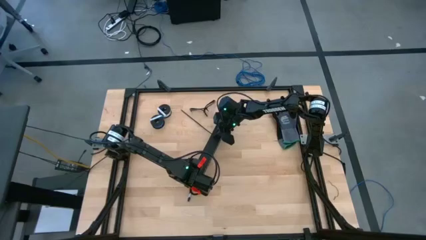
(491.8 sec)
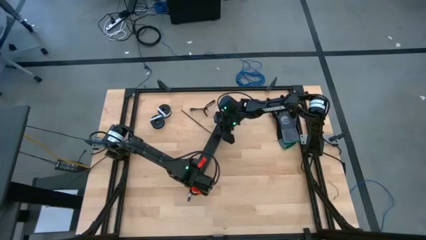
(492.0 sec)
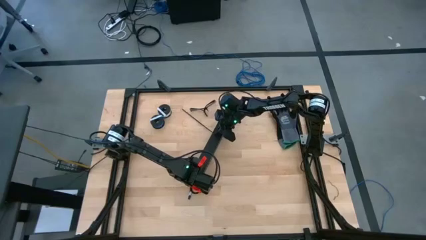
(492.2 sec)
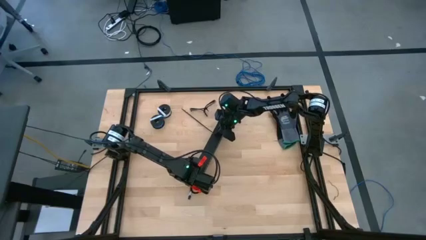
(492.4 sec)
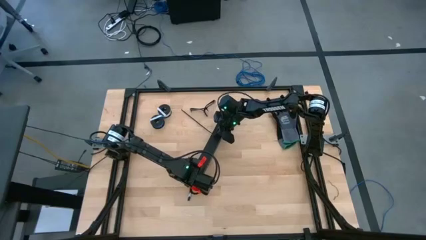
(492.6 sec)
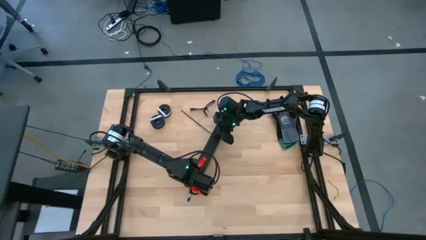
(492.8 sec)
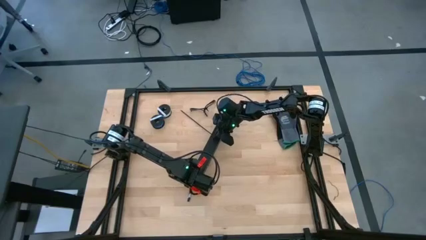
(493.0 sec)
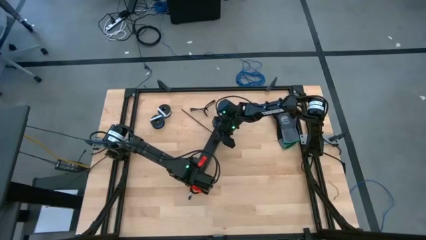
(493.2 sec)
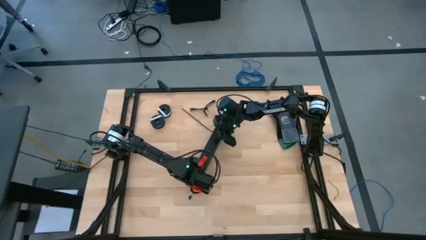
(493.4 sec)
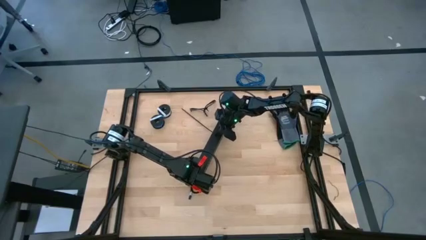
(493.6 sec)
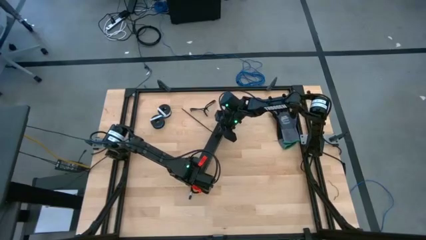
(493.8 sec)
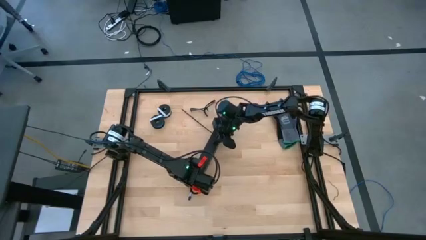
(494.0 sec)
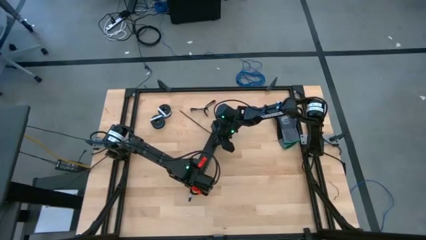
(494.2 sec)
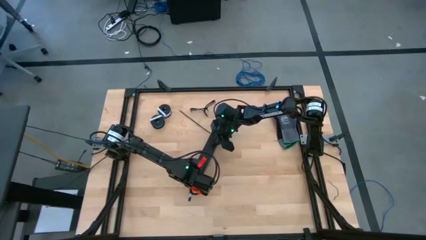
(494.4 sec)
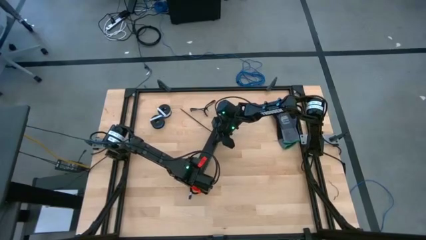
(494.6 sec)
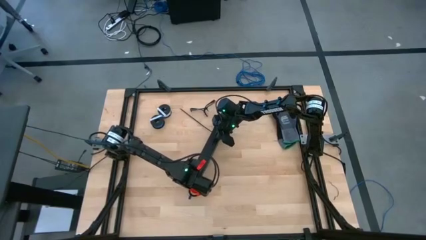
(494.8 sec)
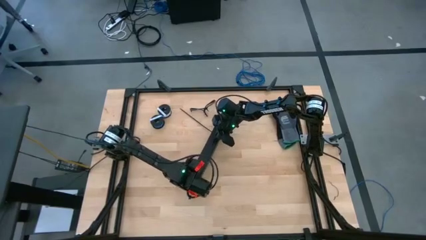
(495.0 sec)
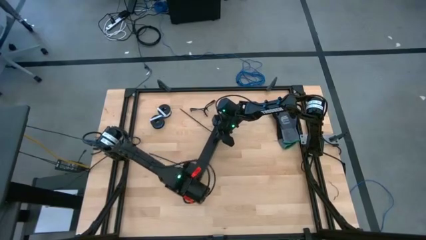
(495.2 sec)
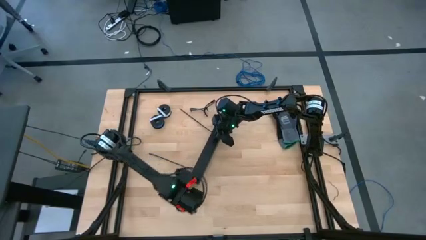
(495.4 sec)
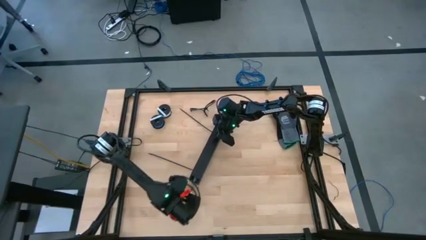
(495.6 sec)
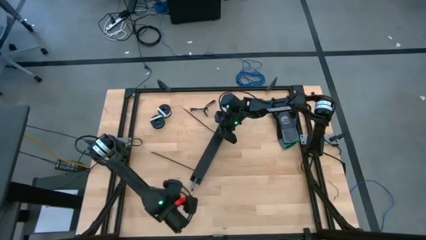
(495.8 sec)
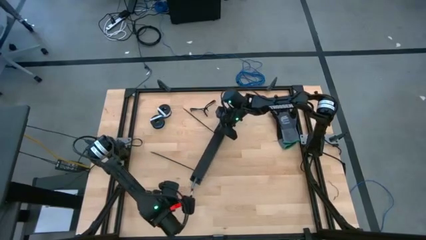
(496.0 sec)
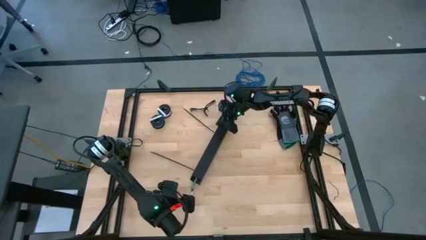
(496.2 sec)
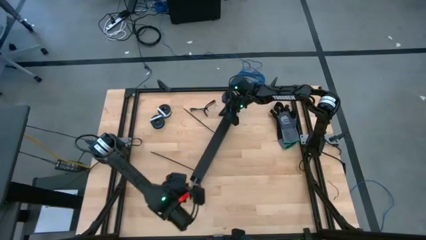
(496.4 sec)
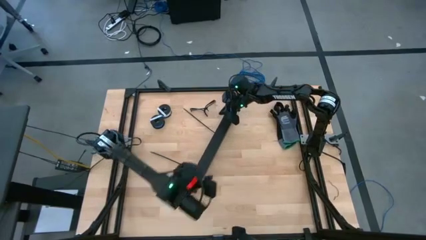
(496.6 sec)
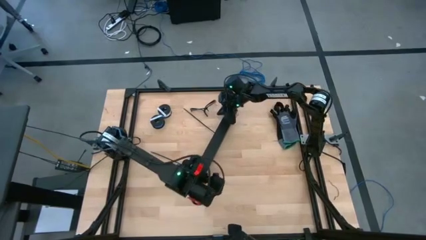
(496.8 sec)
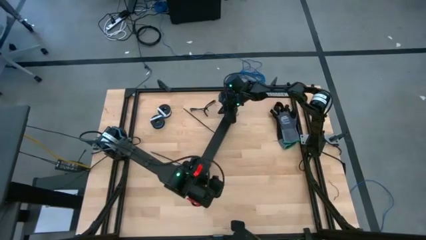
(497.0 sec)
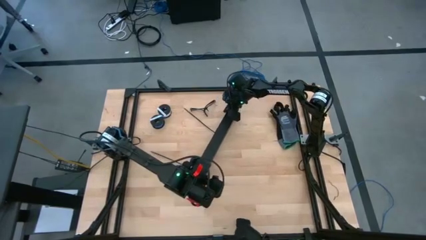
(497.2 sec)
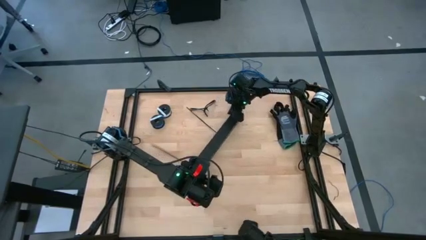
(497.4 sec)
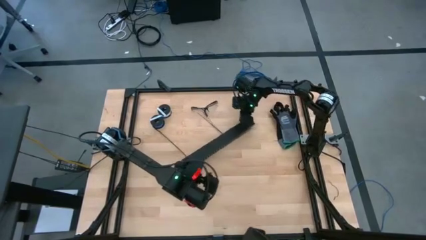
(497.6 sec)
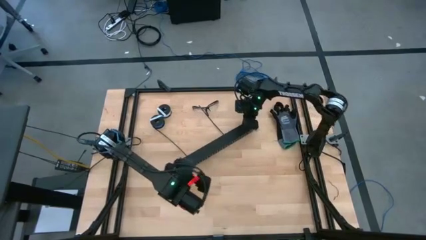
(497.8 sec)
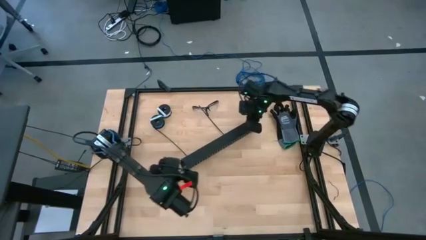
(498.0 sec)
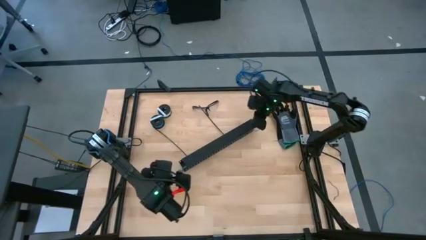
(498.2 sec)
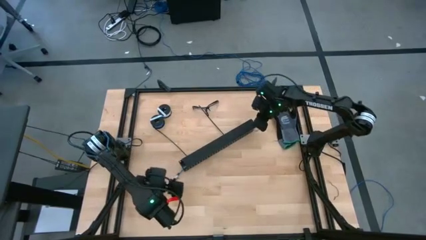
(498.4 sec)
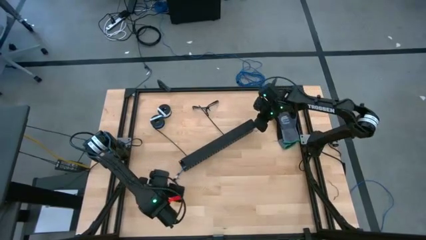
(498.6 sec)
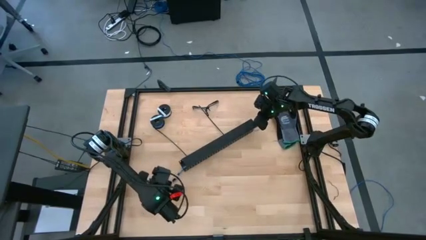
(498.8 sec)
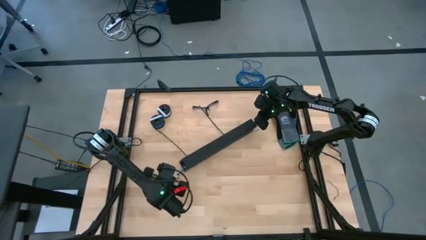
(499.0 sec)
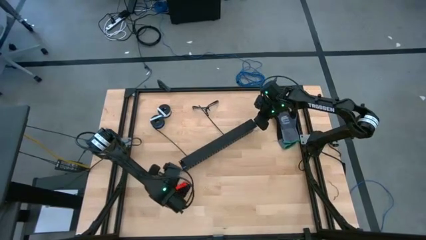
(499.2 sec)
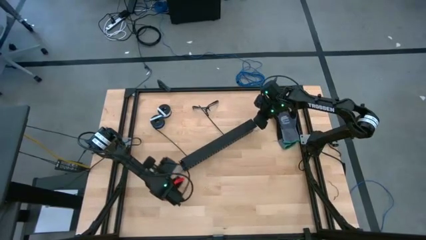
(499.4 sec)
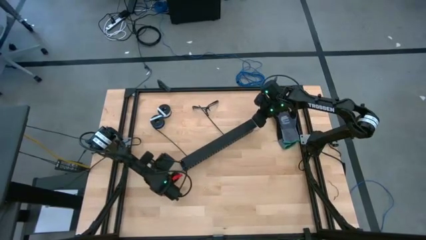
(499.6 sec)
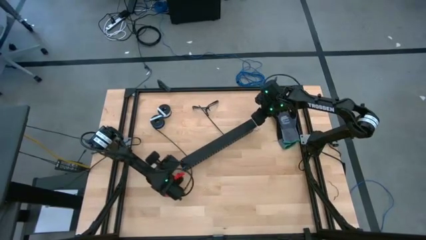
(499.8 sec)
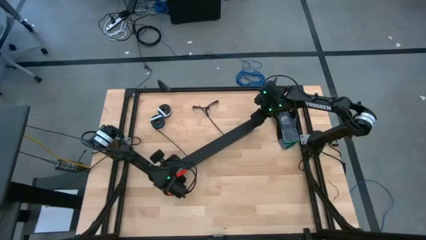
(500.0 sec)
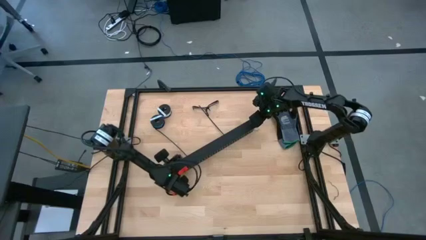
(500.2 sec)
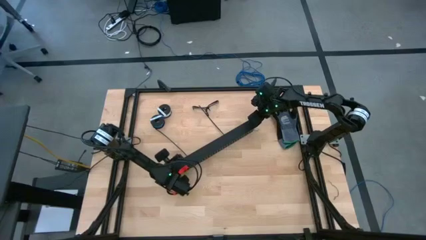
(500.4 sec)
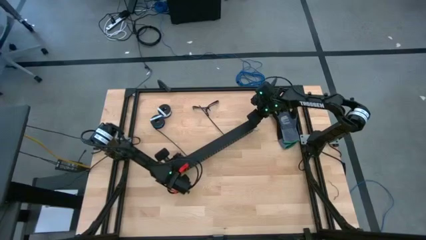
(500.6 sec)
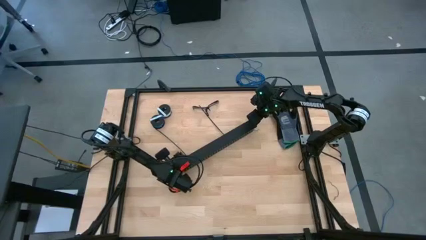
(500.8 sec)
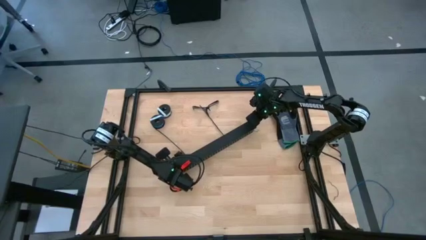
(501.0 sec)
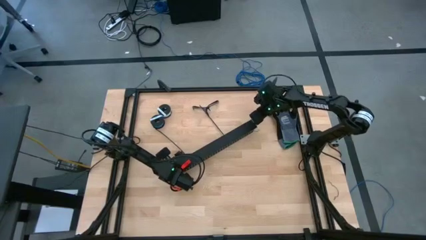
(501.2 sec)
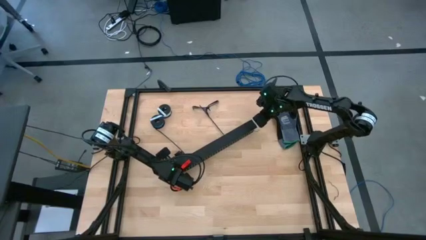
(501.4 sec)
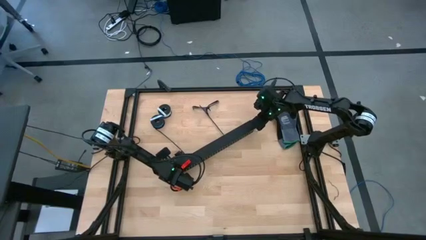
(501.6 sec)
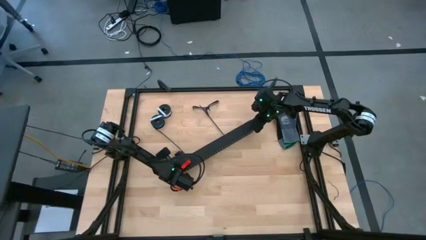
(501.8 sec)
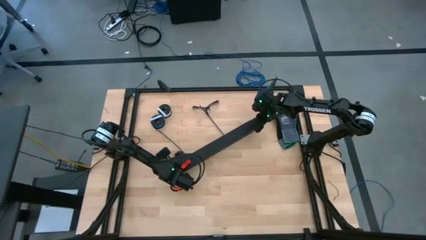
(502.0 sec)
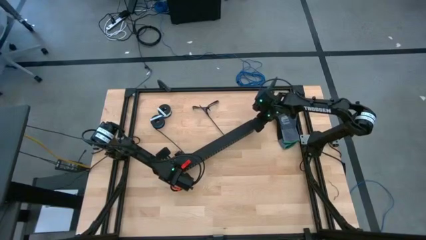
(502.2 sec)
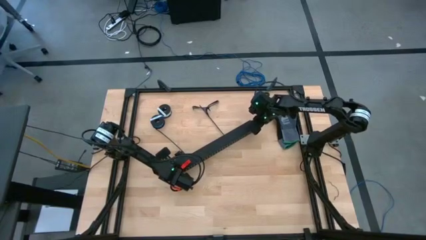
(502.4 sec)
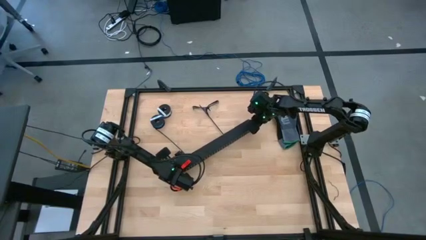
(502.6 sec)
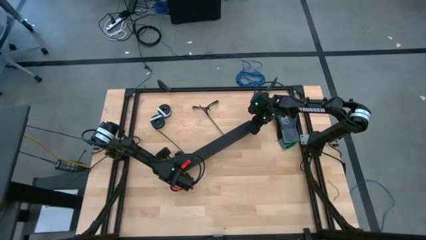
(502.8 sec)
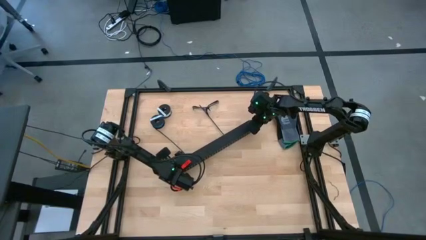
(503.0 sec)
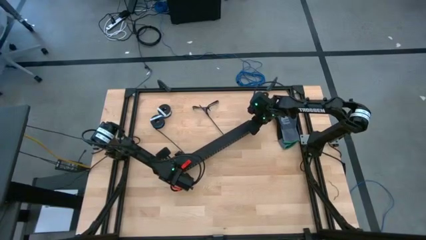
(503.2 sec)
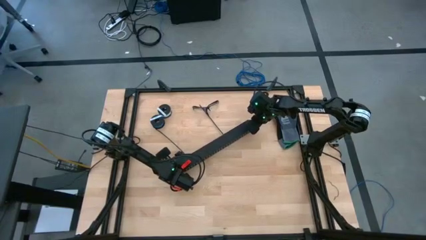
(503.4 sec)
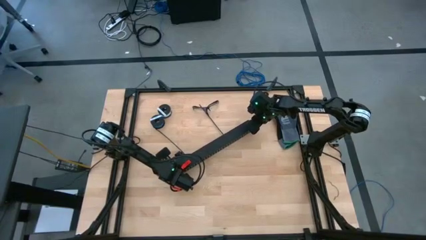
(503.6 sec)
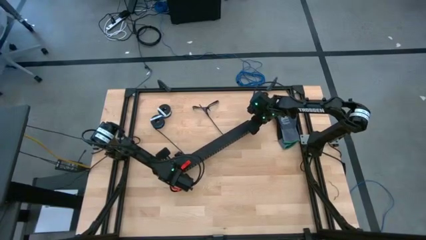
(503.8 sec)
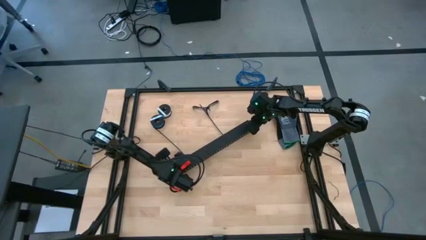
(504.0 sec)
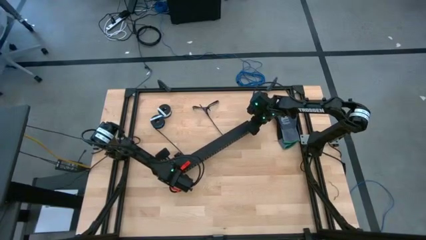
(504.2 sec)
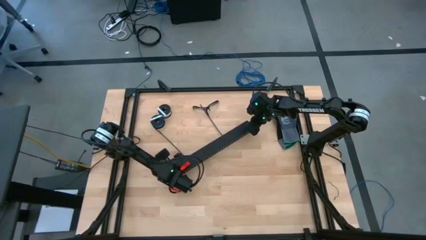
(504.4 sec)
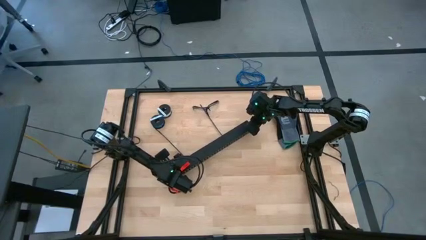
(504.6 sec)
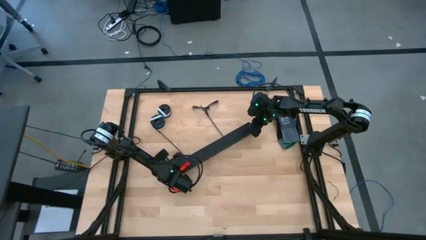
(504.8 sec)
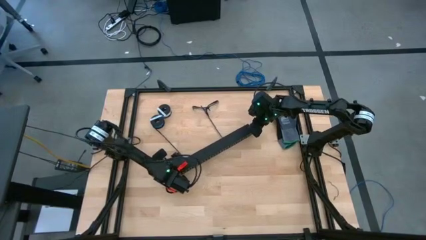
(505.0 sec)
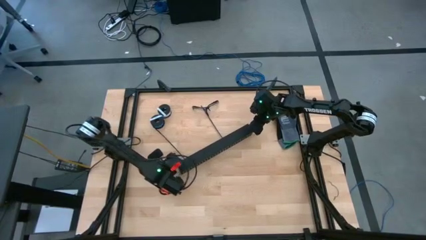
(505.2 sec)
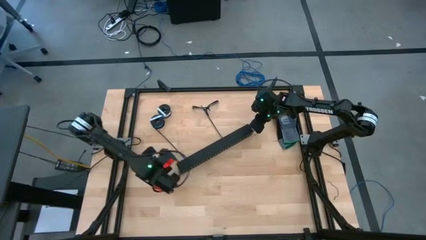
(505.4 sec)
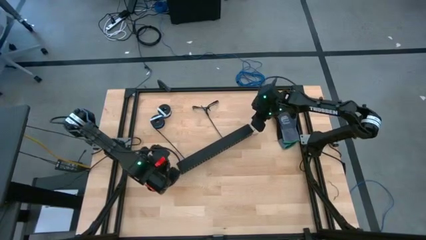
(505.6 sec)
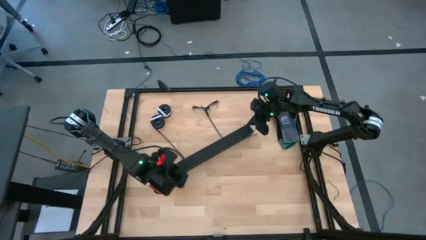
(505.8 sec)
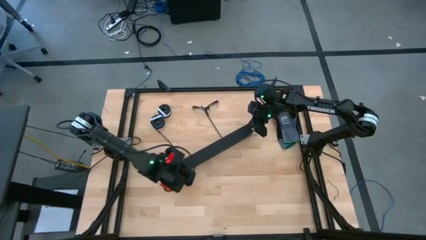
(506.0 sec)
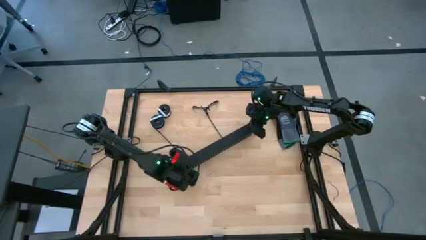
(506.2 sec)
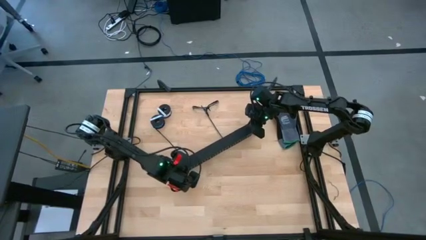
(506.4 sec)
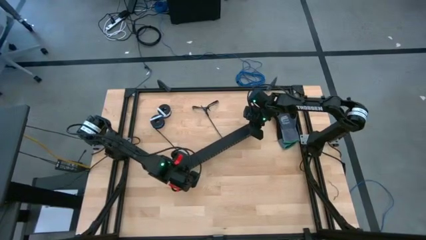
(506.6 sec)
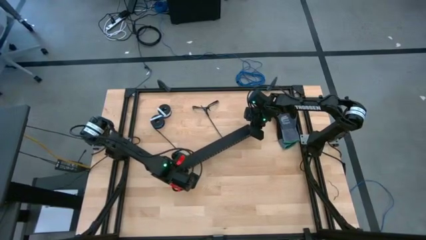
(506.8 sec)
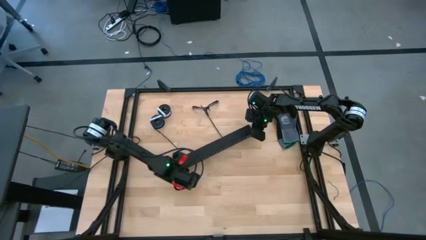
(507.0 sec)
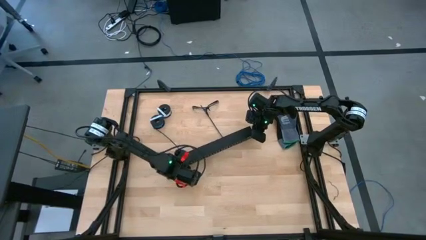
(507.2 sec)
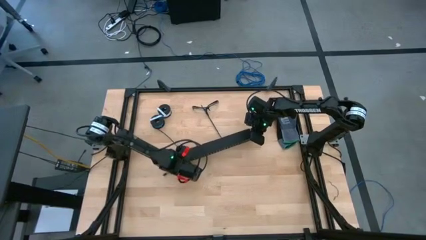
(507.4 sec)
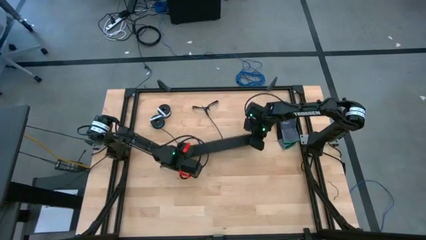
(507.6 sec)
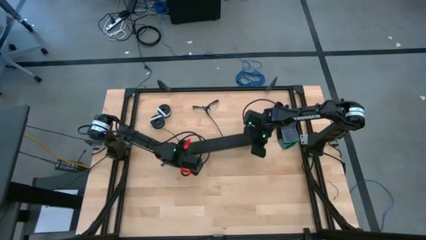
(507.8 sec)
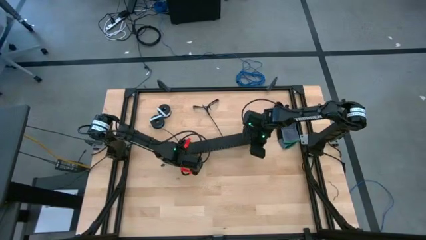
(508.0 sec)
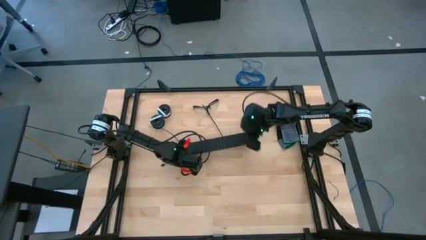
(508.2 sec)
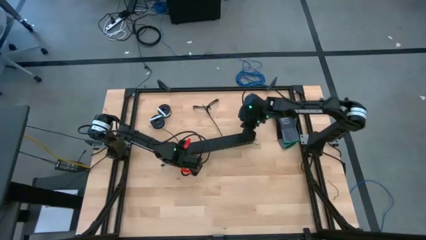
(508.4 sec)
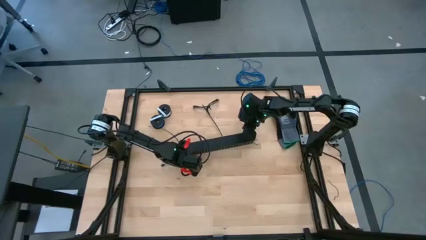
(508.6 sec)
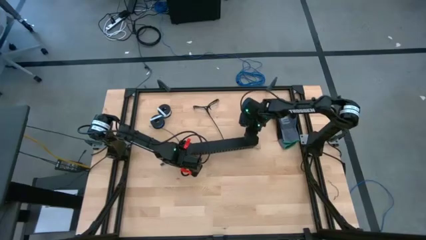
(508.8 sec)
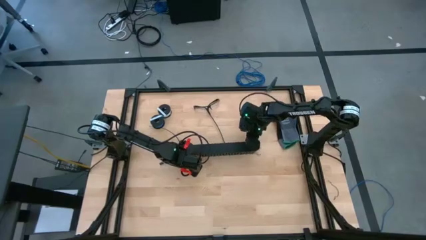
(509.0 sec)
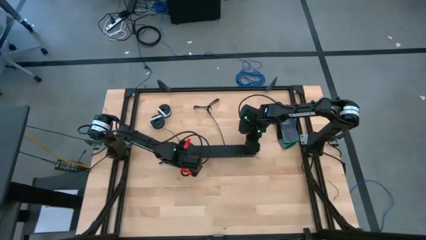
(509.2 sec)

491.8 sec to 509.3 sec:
Task: Ziptie cables
Insert the black cover of the black cable duct
